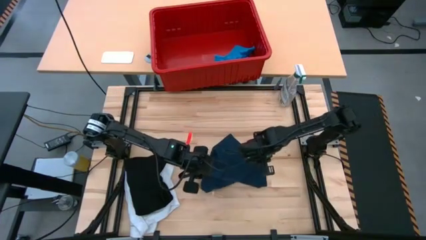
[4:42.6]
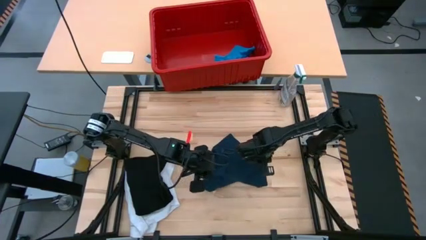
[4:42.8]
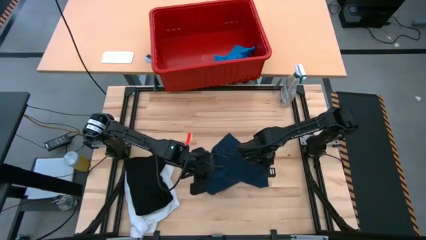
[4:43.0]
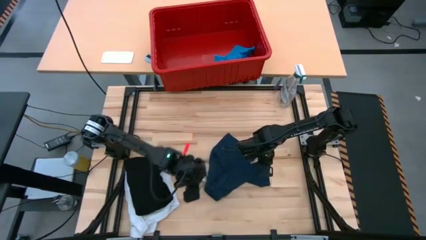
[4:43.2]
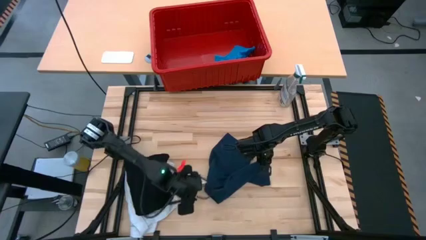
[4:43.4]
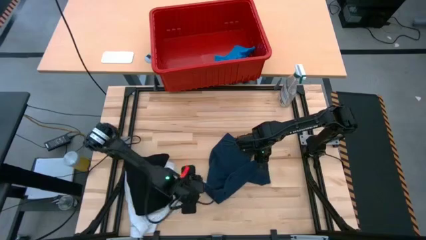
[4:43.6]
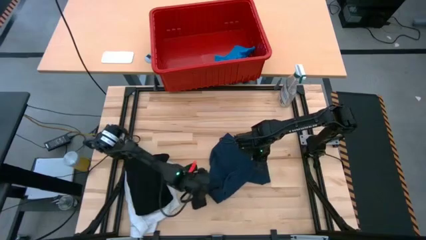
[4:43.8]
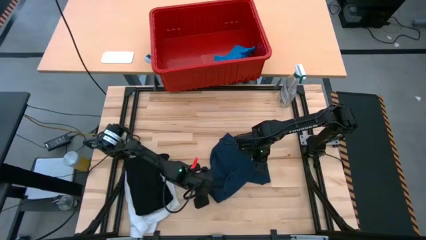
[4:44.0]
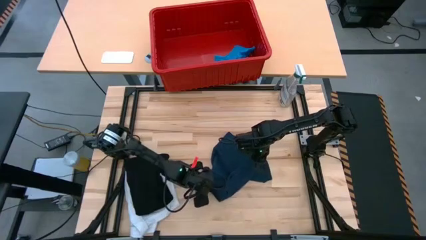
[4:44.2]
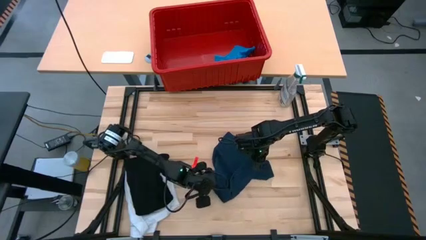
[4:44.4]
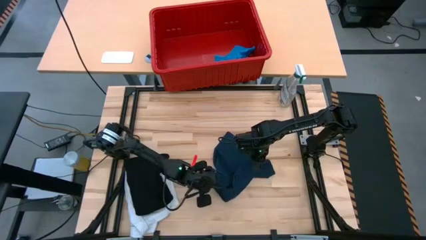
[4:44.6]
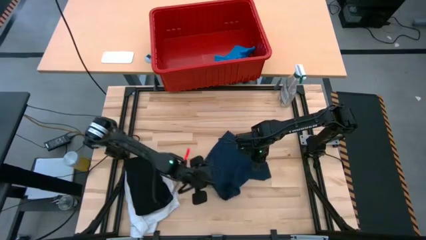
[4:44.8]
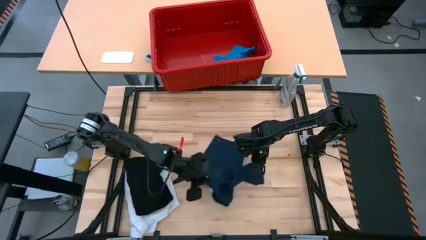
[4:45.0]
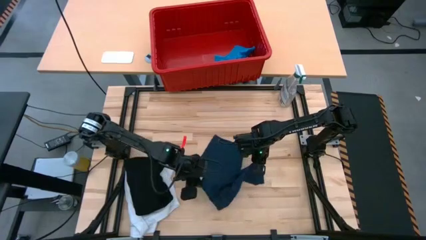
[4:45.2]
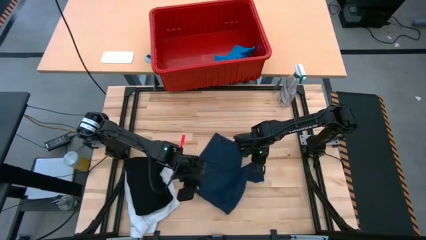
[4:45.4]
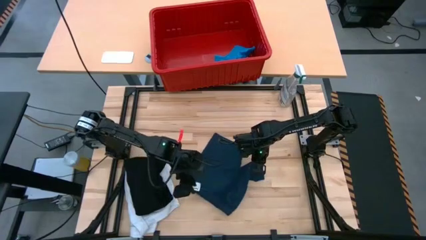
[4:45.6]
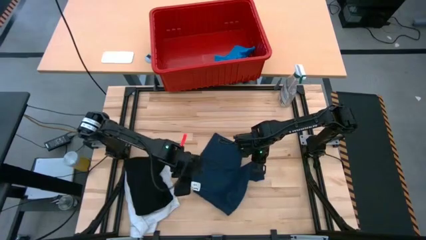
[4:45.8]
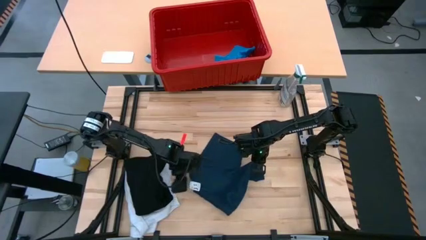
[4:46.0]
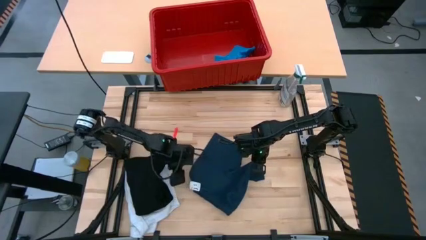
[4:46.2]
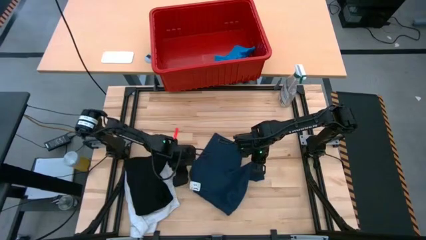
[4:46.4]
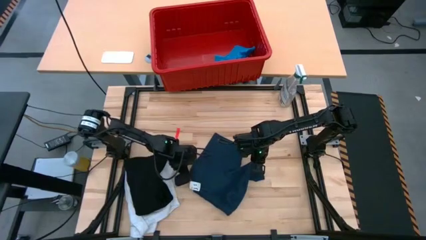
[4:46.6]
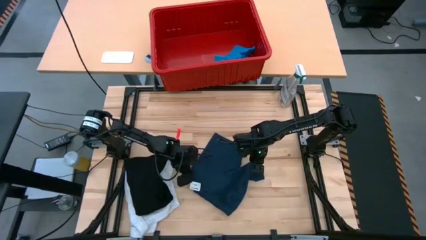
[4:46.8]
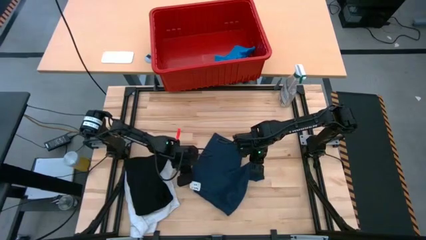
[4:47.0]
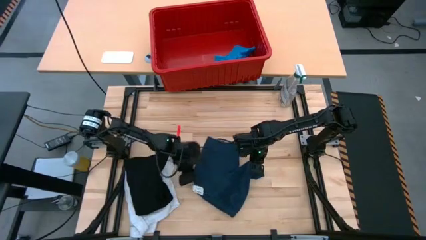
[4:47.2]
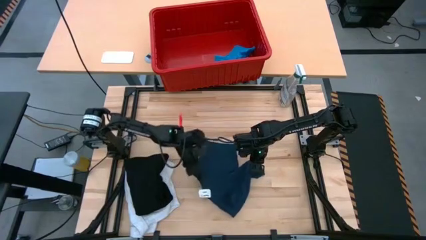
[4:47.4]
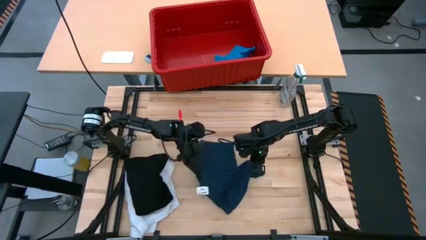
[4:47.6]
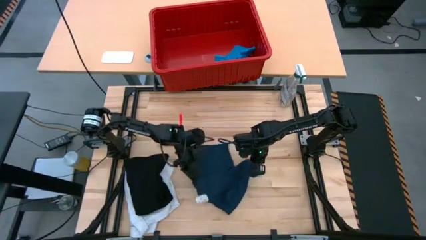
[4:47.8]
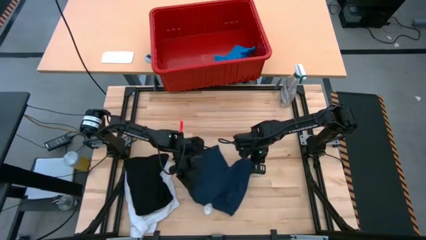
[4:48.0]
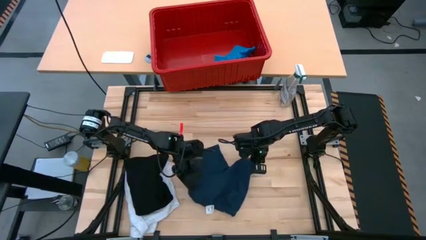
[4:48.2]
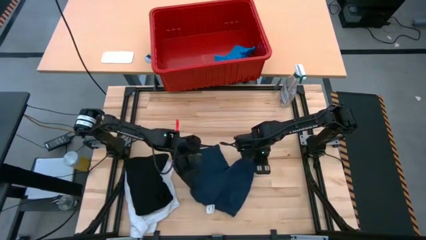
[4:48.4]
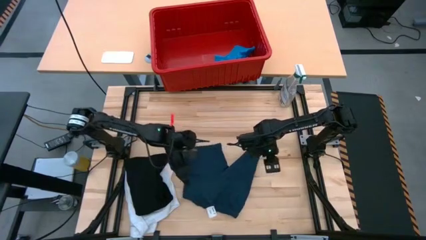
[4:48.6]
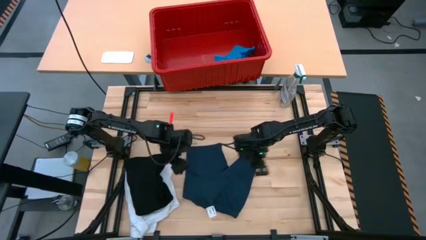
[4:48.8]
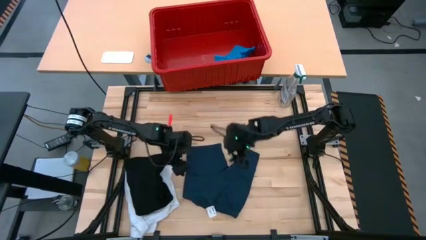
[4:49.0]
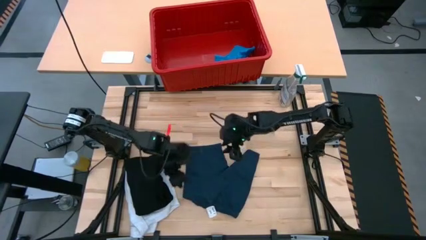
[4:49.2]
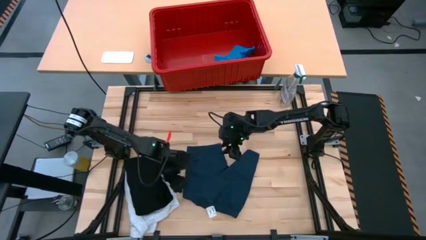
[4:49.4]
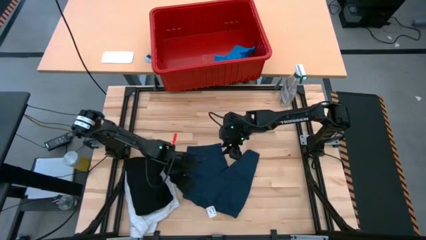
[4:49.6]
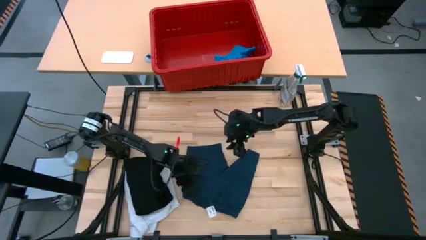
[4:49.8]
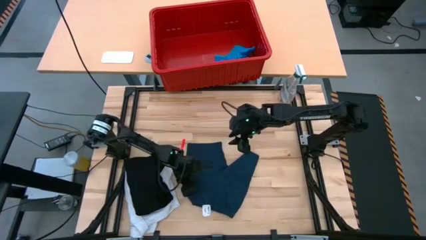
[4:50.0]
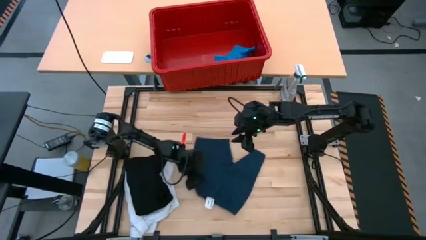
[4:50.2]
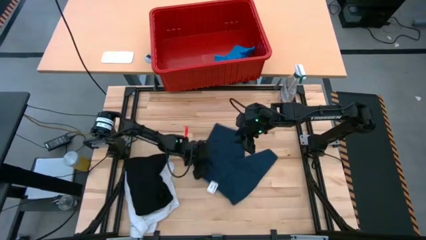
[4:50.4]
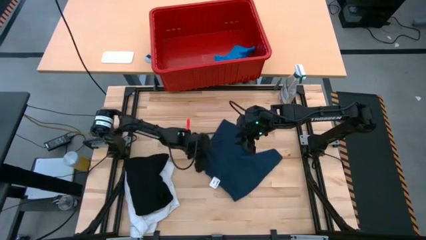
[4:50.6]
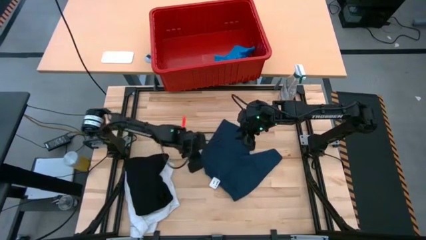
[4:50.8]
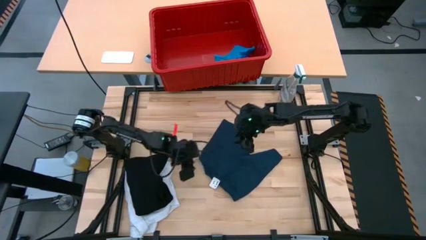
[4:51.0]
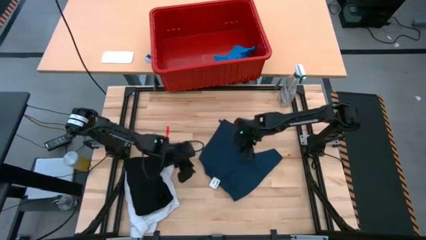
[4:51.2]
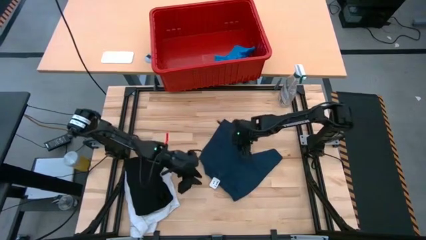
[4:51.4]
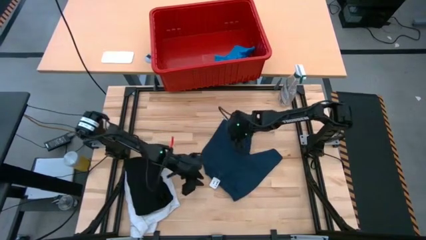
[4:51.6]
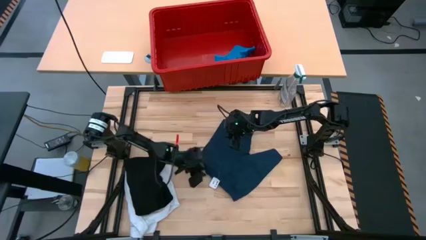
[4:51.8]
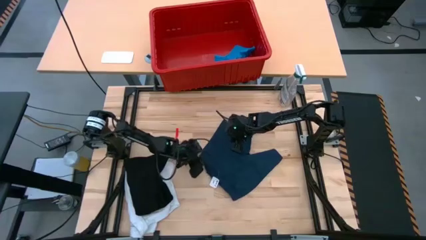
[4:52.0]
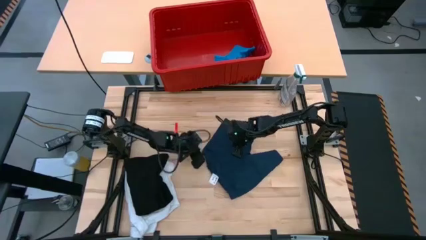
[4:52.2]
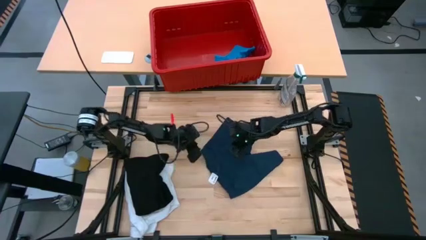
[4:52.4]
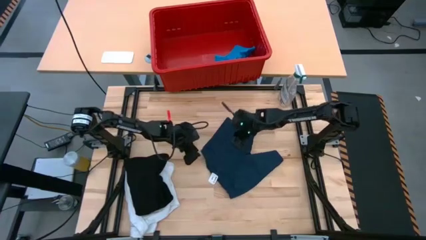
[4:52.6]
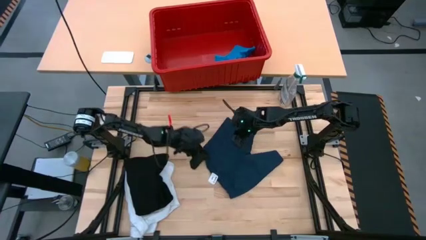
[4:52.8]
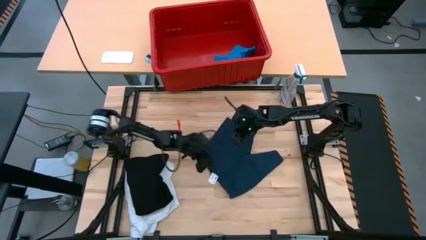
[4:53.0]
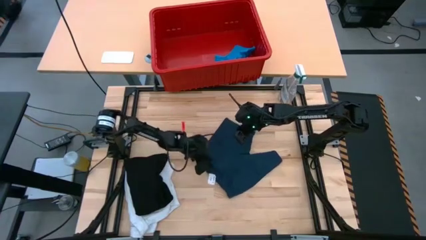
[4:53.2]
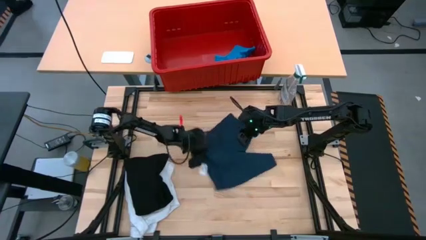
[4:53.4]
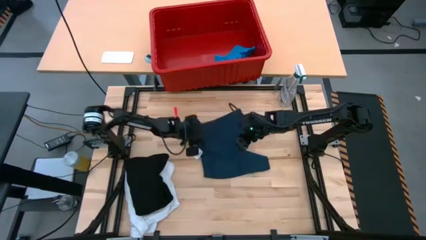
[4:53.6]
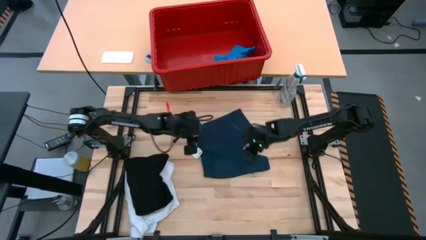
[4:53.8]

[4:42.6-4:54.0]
Task: Fold Laundry from Bin
Remove the dark blue shorts from the red bin and place them on the table

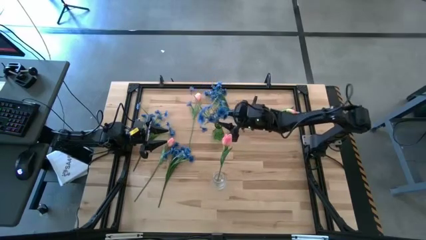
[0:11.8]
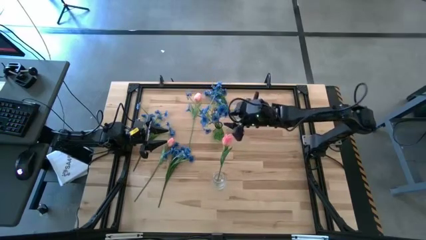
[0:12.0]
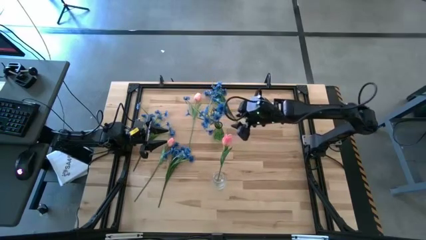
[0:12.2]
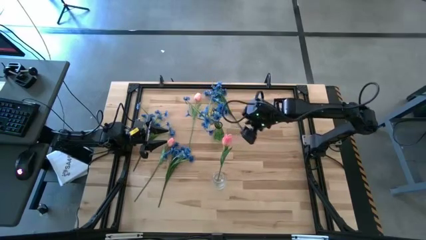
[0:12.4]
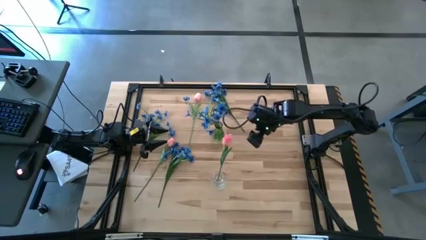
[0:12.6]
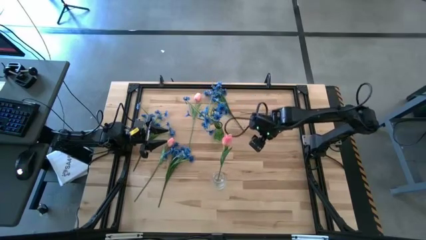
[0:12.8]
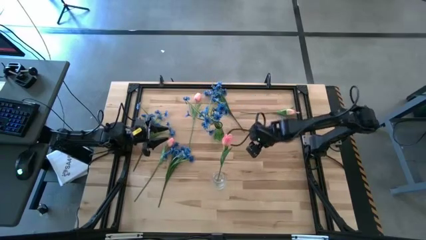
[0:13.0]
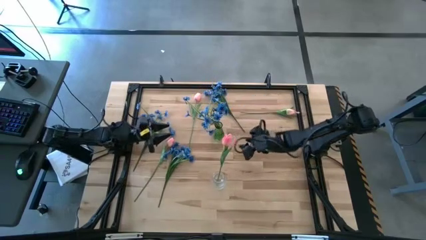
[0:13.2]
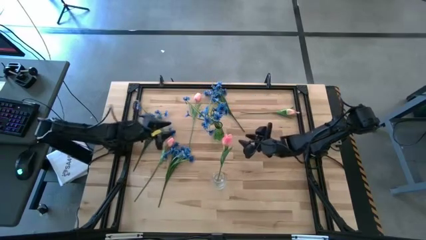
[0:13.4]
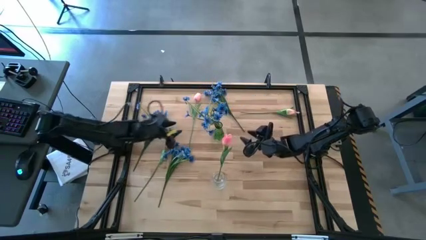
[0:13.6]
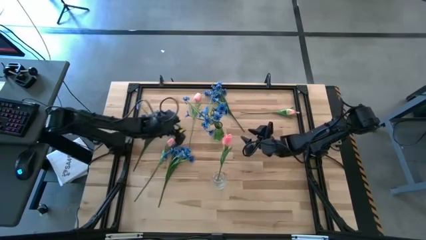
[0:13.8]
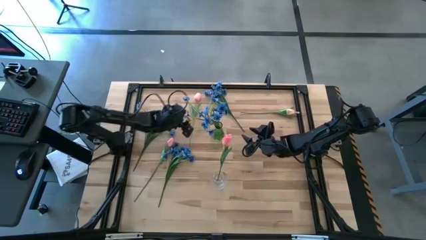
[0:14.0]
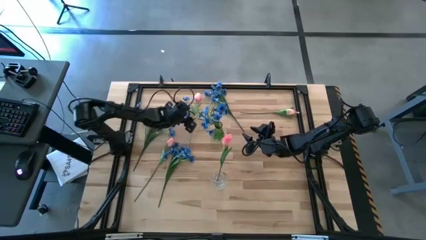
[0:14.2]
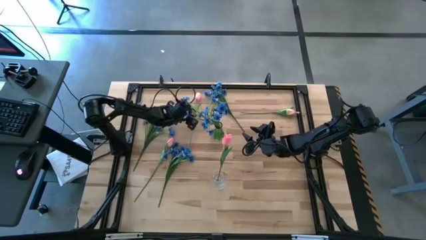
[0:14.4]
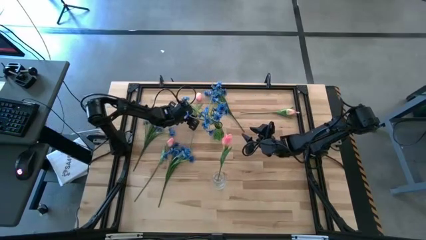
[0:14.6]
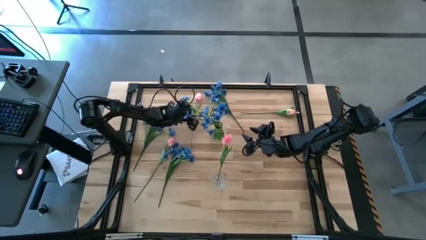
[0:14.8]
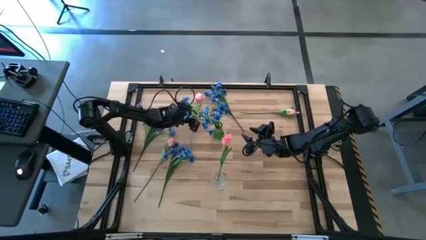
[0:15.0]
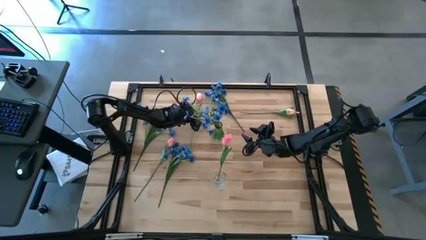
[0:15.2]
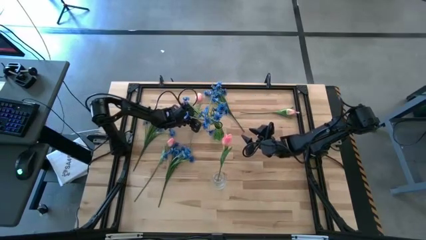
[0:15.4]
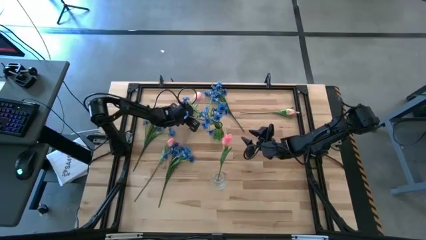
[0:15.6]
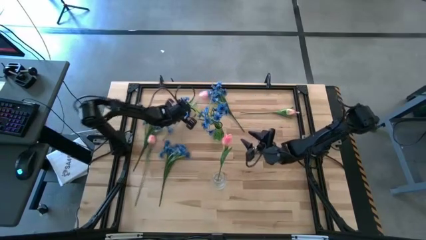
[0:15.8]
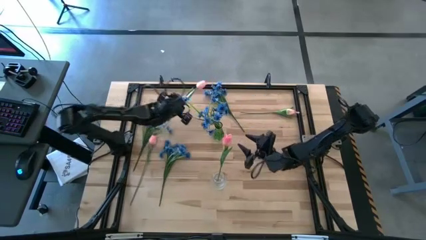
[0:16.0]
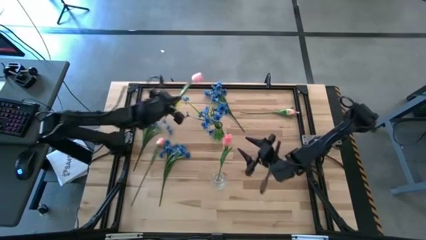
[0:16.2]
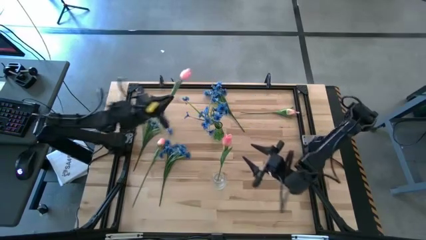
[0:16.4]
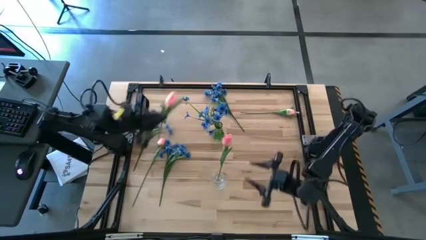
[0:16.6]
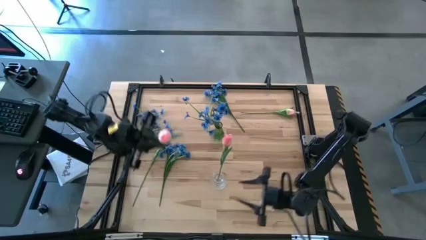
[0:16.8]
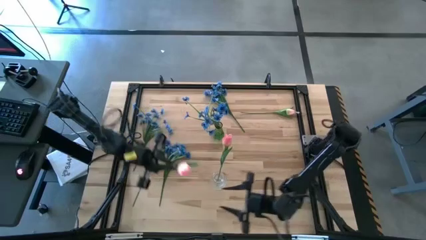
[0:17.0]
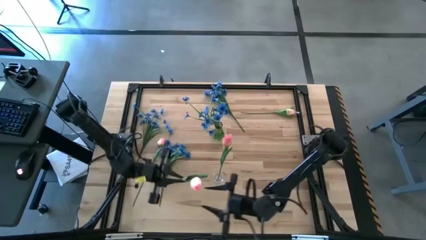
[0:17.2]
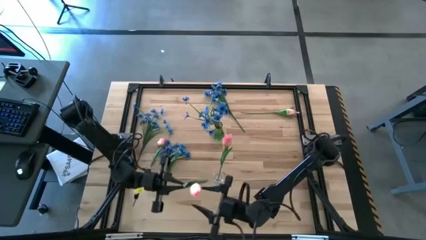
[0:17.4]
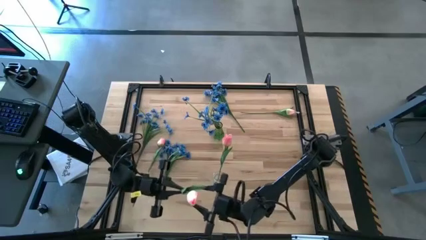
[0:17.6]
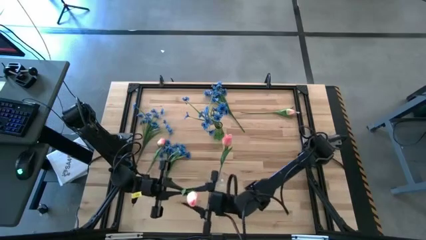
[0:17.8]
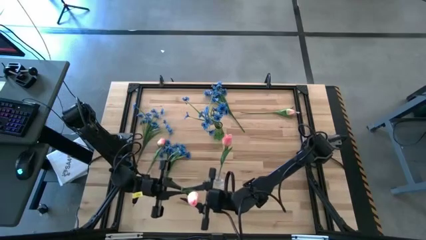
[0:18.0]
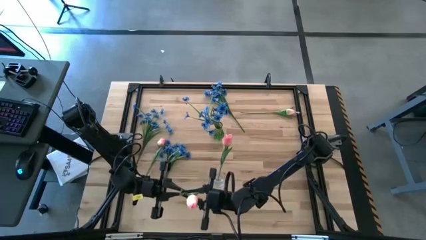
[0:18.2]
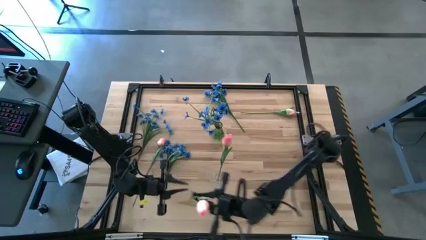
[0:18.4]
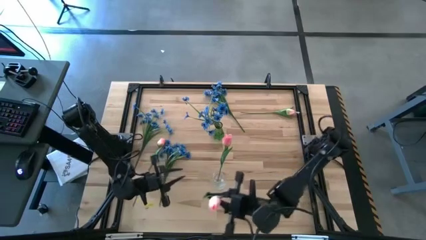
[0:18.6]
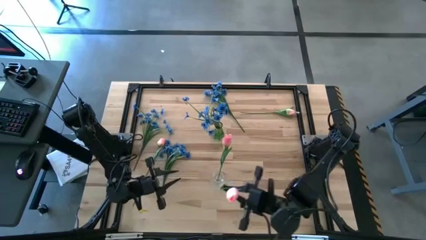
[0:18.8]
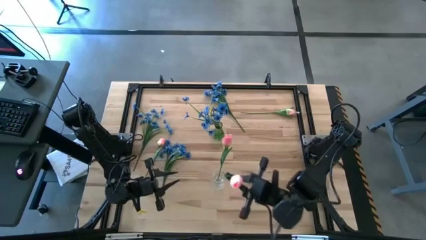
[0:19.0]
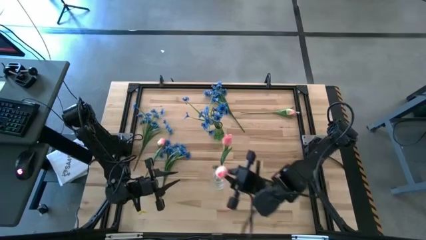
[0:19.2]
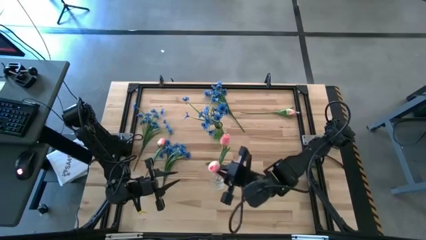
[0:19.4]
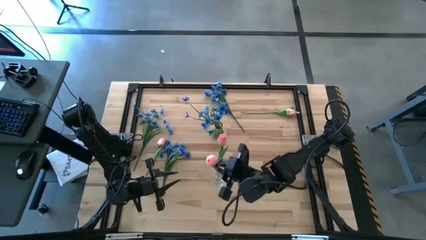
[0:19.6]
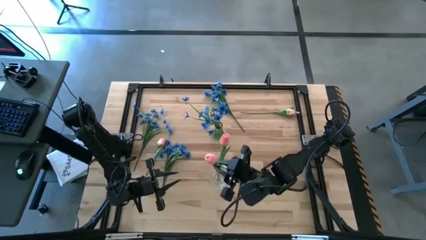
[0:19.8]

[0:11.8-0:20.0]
Task: Sort flowers into vase by color
Put the top left pink tulip into the transparent vase
